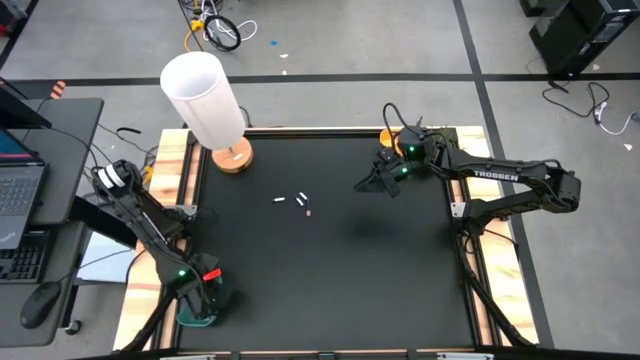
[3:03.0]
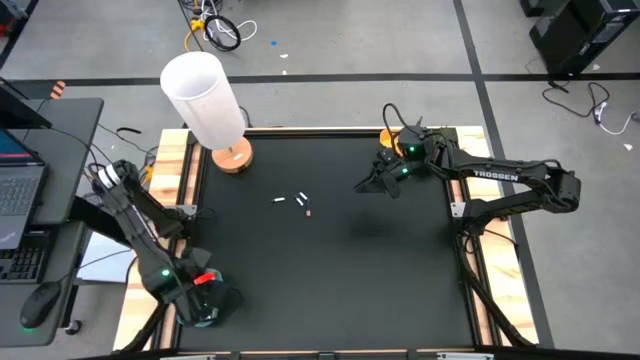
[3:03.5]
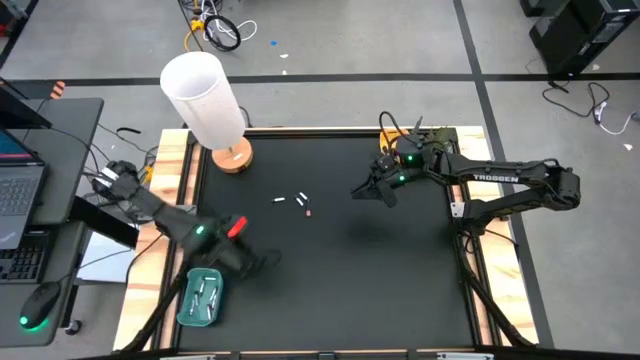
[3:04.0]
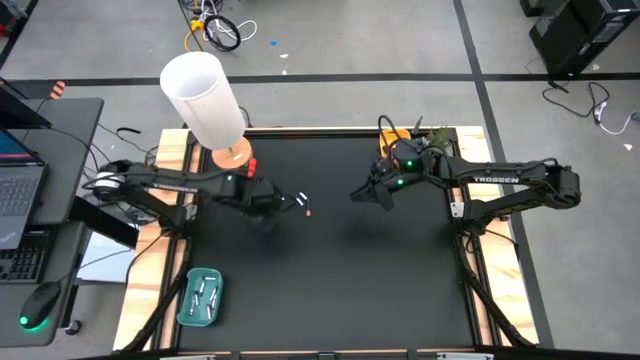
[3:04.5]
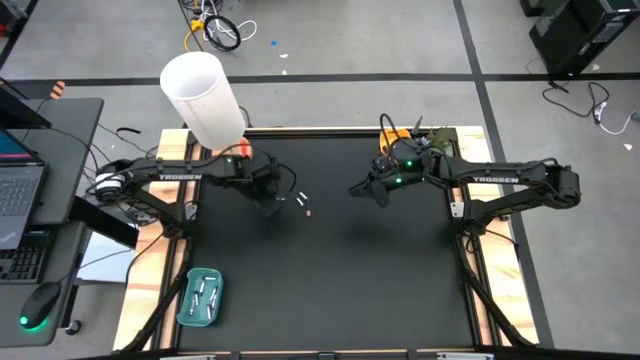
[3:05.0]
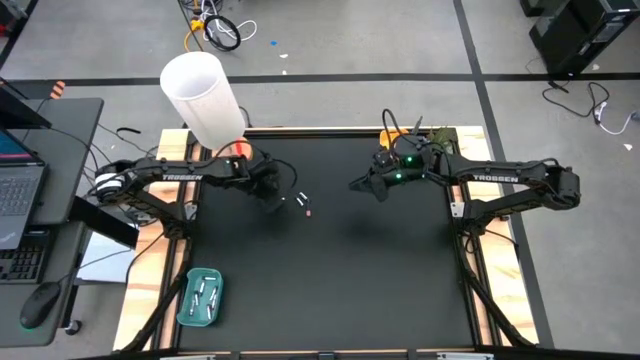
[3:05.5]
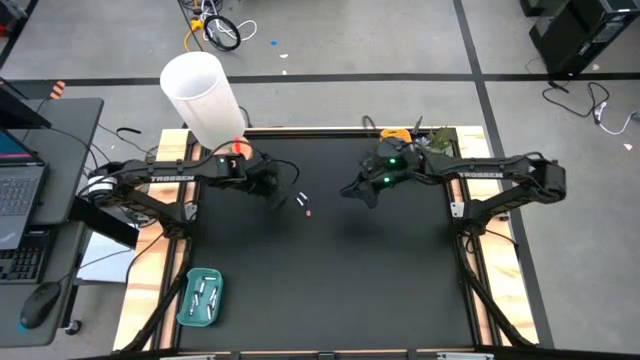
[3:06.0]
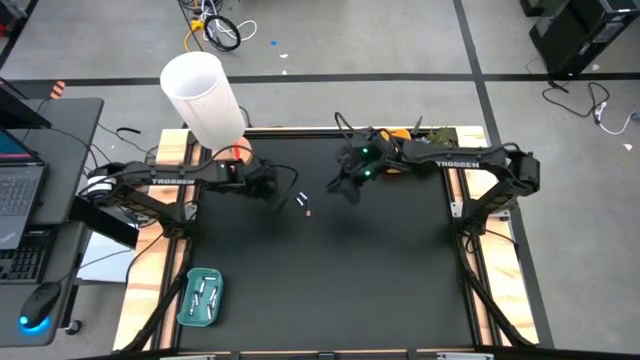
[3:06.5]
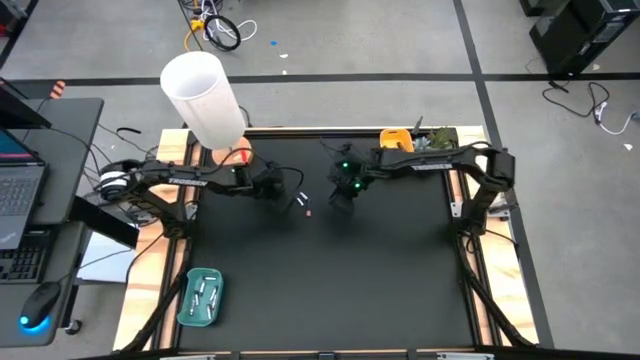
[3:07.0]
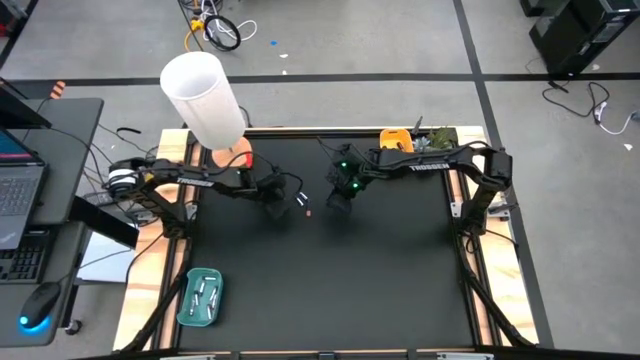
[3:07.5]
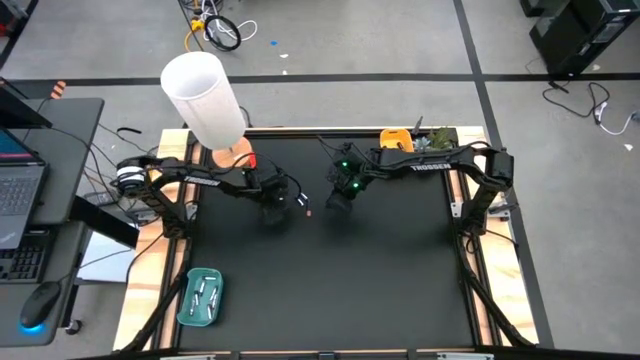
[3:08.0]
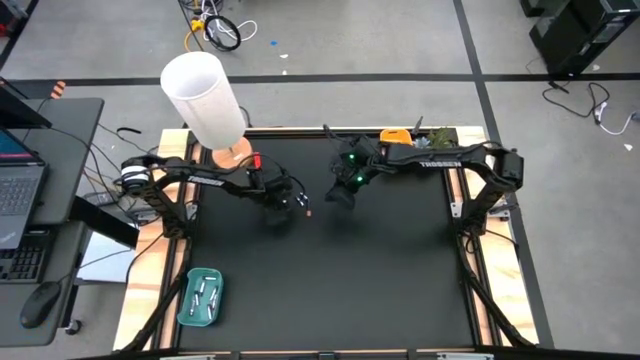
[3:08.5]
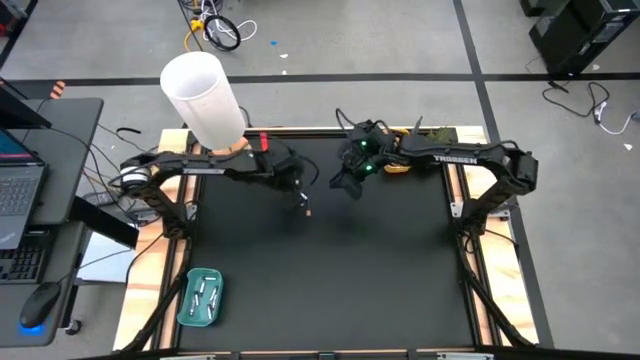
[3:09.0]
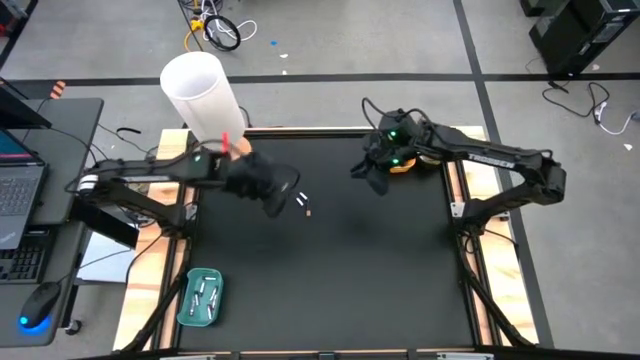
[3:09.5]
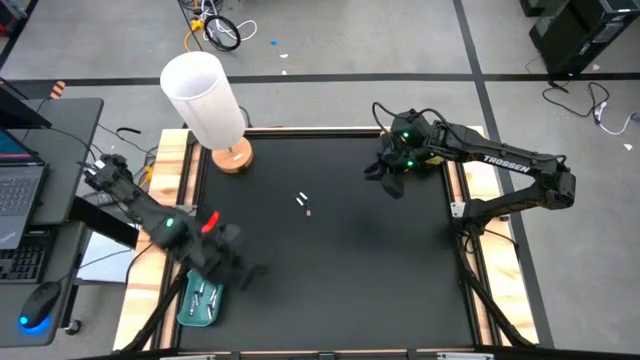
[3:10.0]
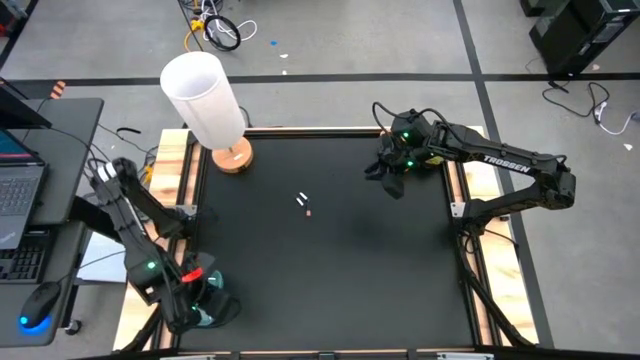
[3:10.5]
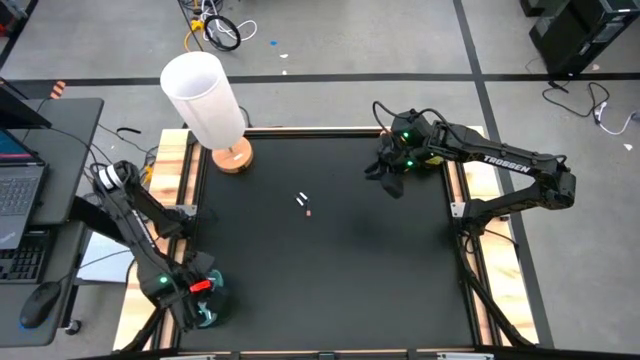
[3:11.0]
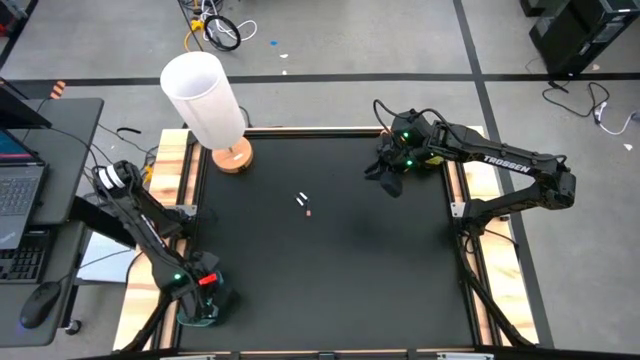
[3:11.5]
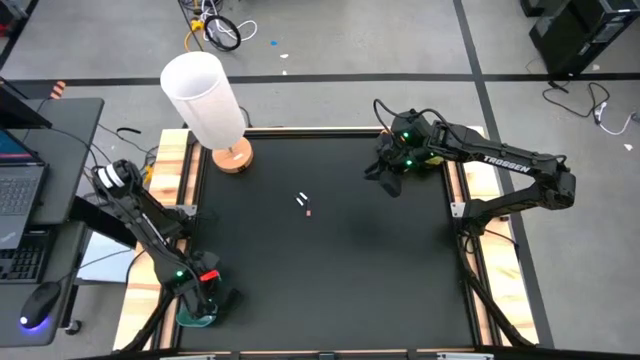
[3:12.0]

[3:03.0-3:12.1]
Task: Sort batteries
Put the left silver battery into the blue bin

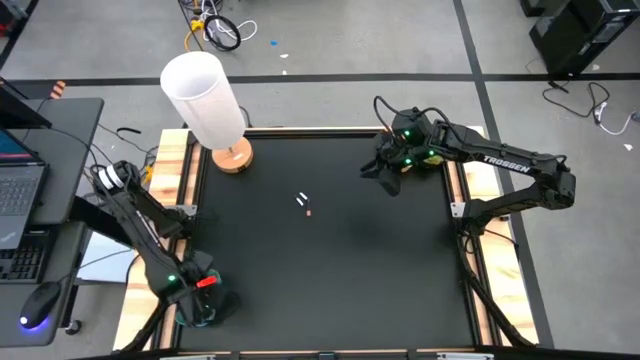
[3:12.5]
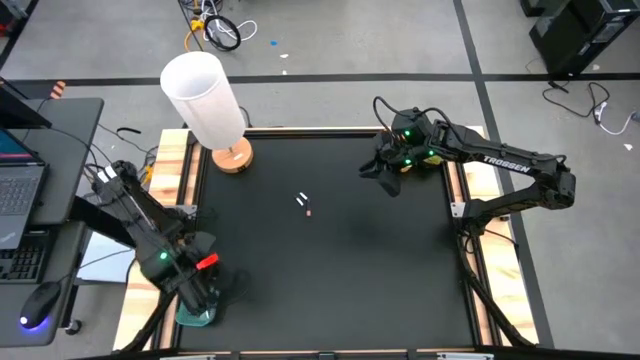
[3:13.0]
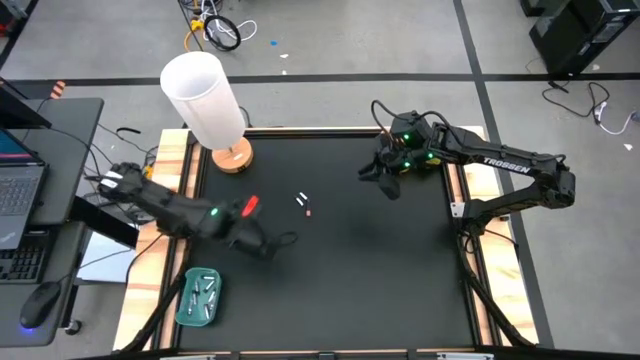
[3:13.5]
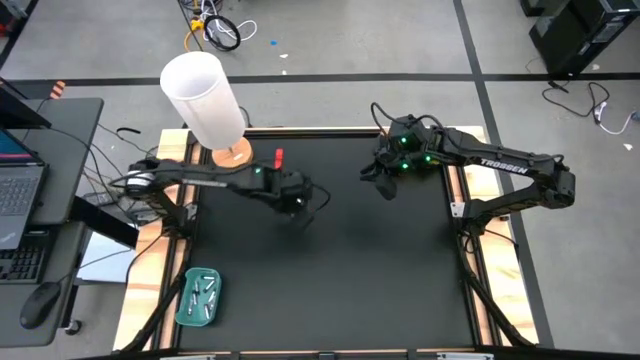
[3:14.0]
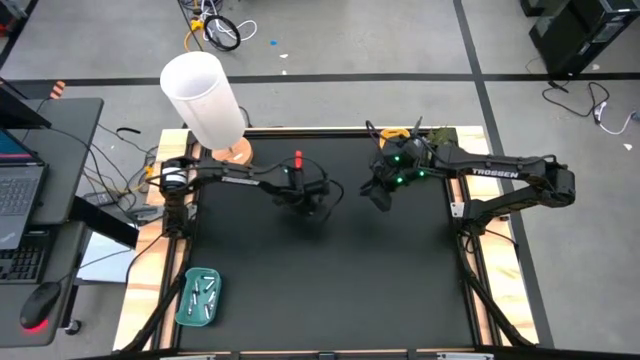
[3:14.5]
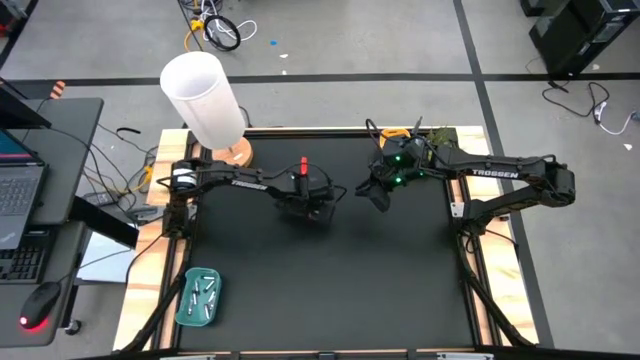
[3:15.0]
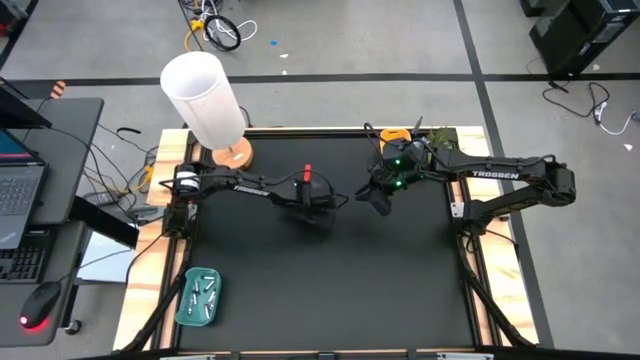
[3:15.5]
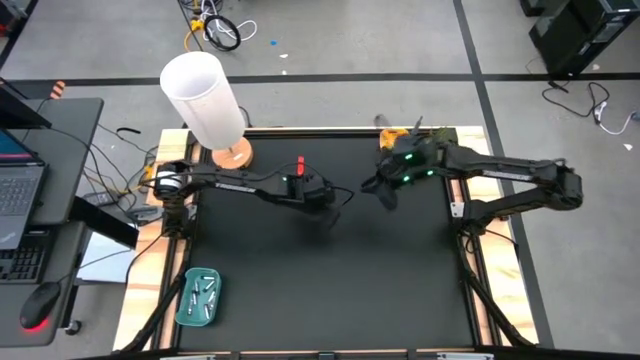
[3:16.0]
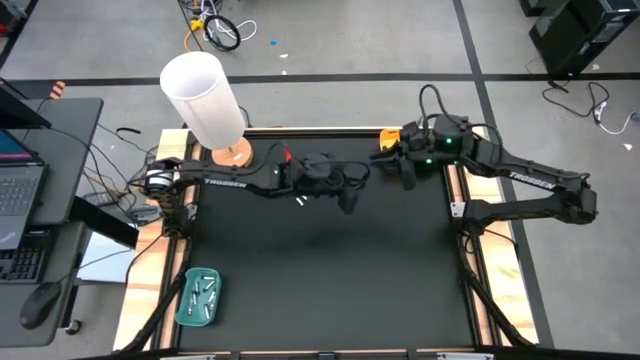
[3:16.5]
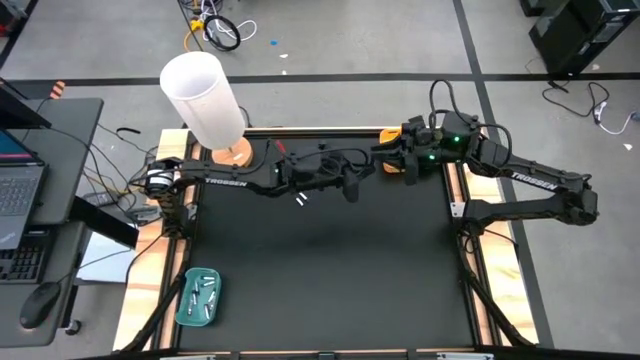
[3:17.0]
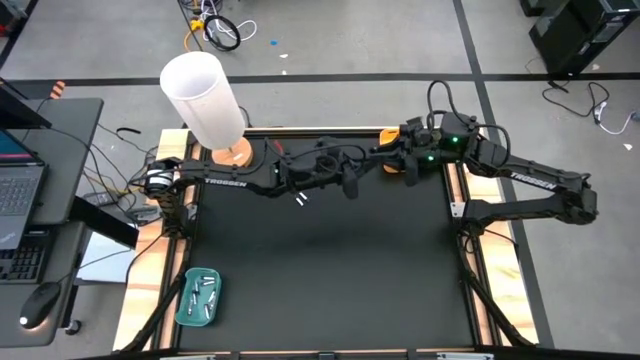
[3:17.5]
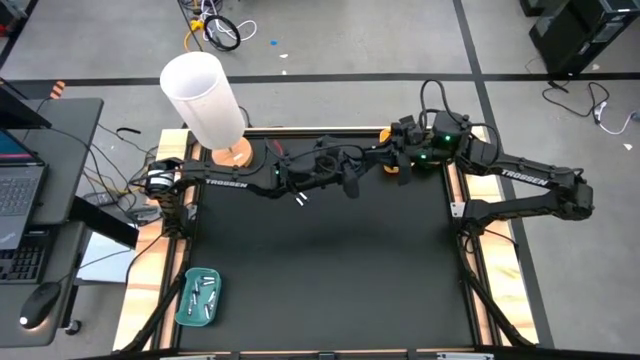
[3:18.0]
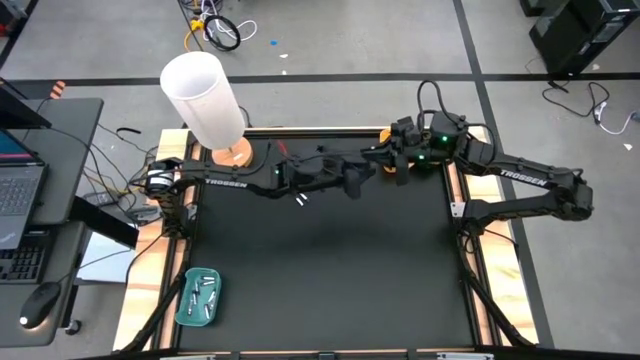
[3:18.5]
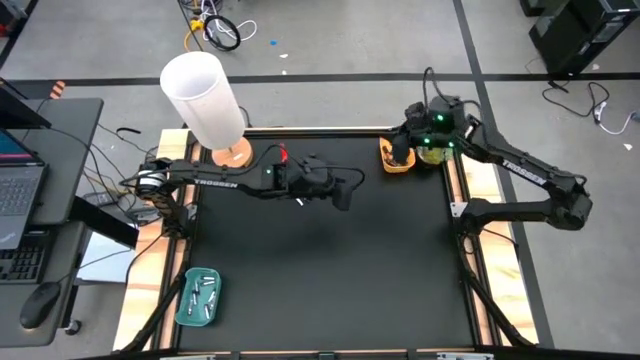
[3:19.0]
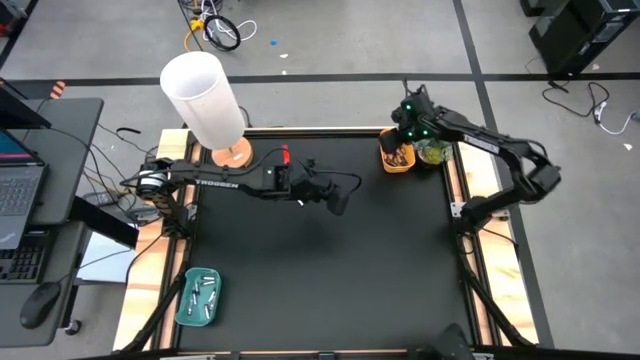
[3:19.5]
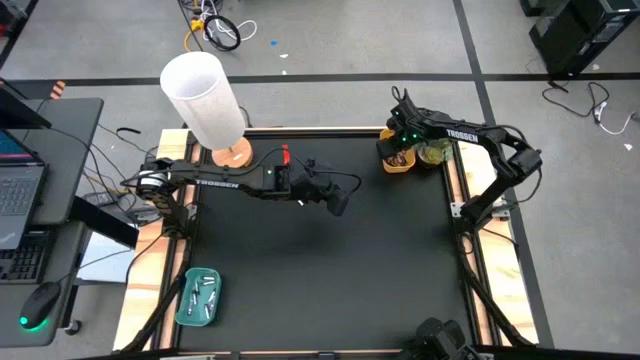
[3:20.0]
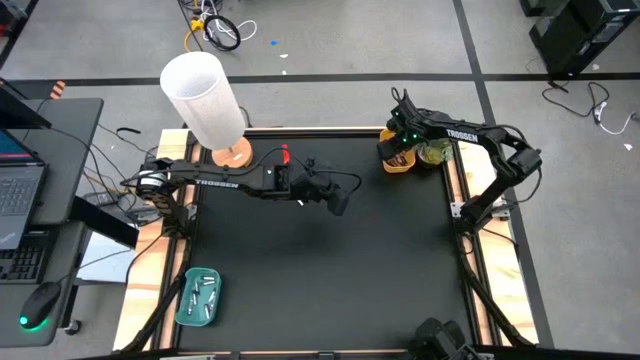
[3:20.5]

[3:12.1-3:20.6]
Put the black battery into the yellow bin

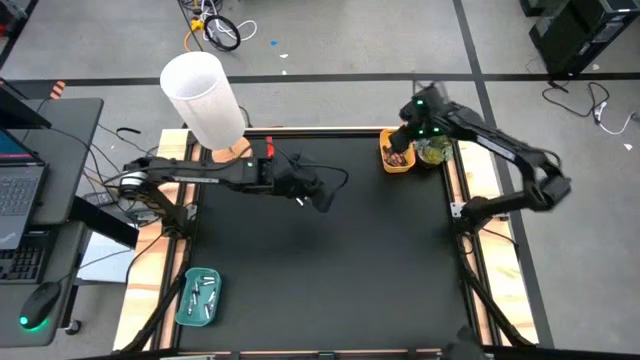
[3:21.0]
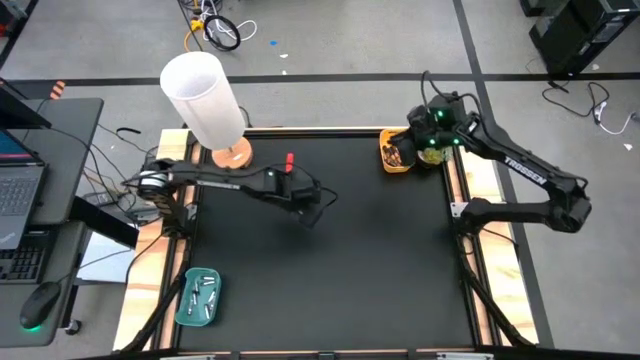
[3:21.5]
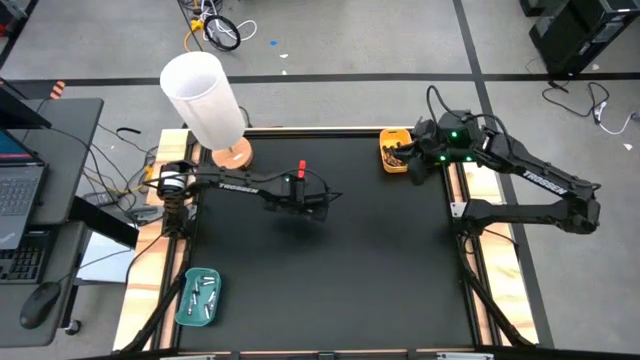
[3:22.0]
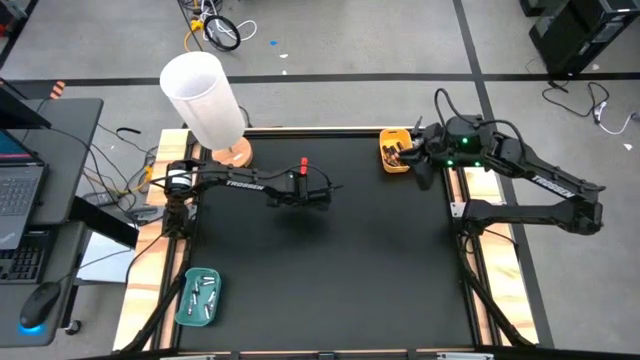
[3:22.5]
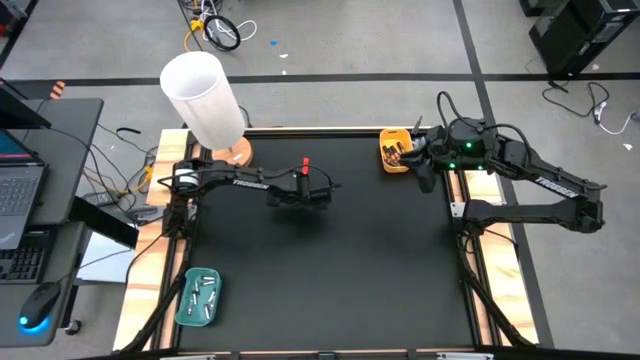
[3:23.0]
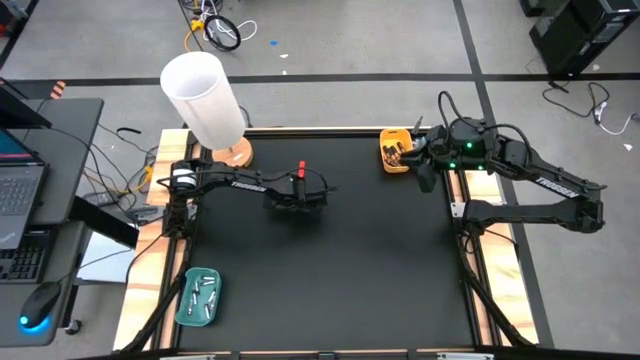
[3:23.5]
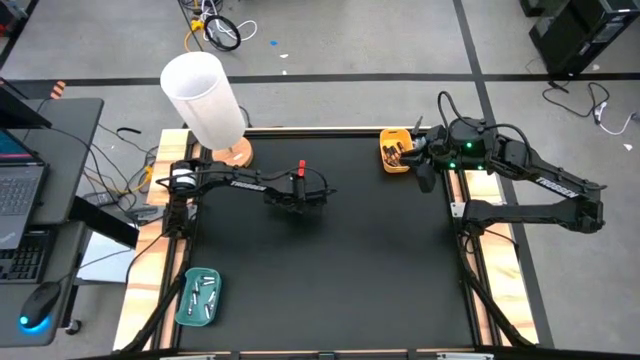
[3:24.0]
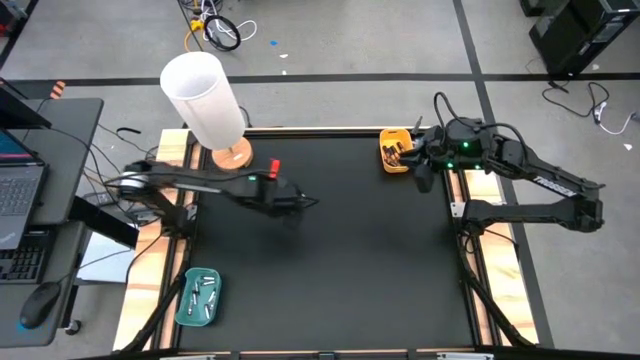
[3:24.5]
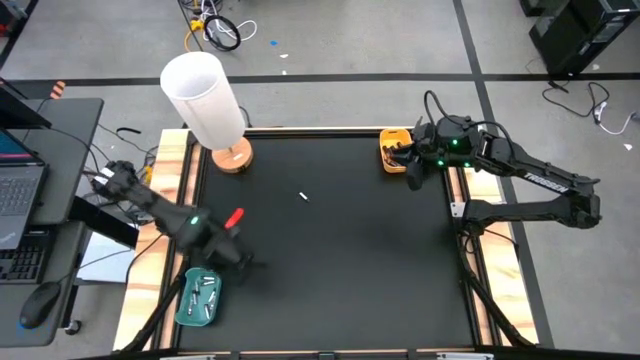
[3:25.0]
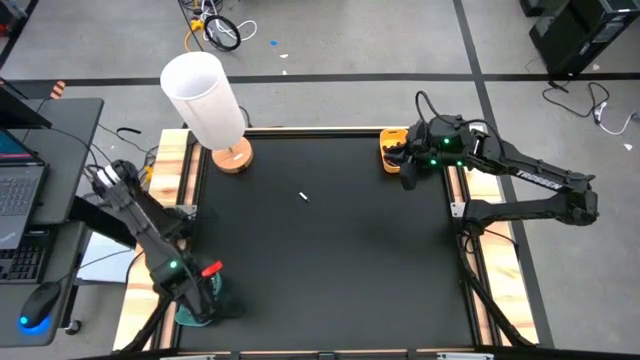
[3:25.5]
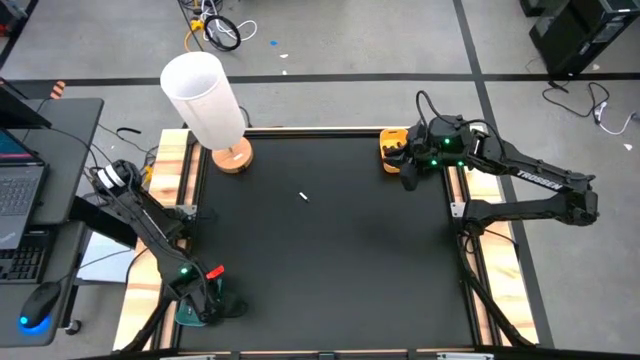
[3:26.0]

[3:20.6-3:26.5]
Put the left silver battery into the blue bin
